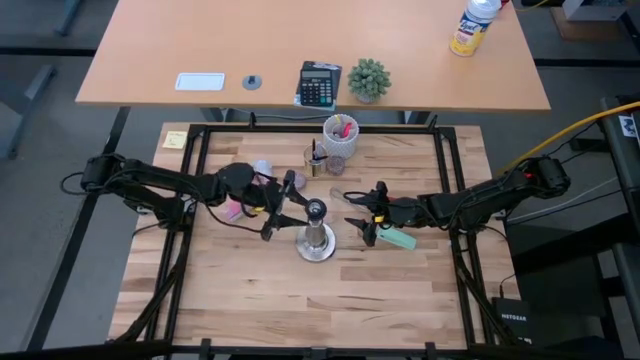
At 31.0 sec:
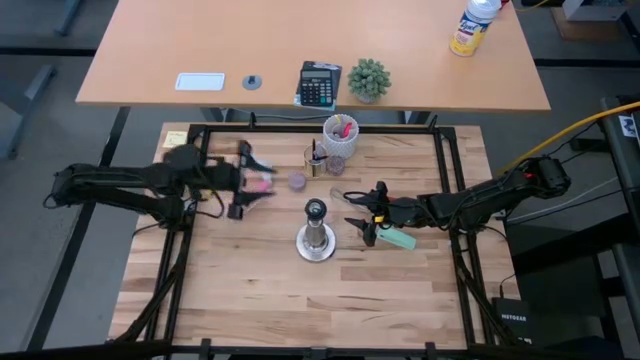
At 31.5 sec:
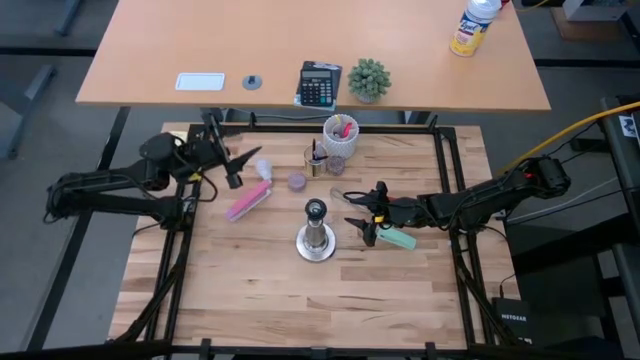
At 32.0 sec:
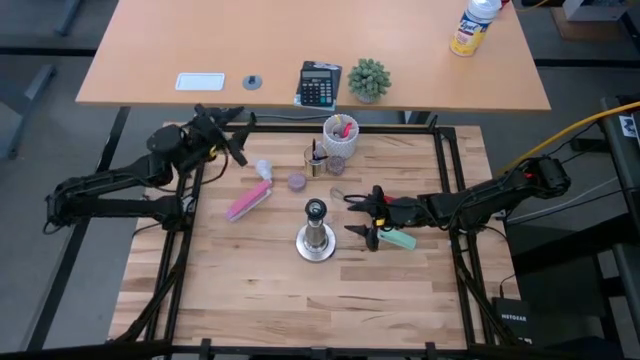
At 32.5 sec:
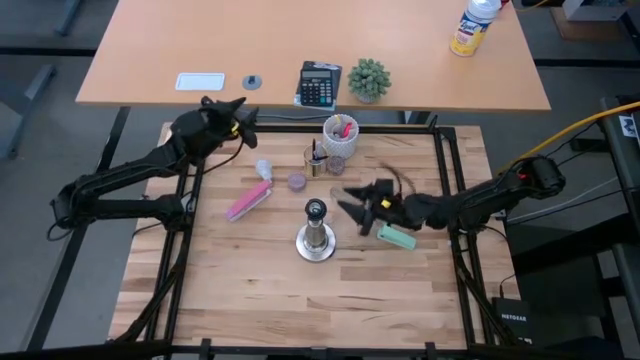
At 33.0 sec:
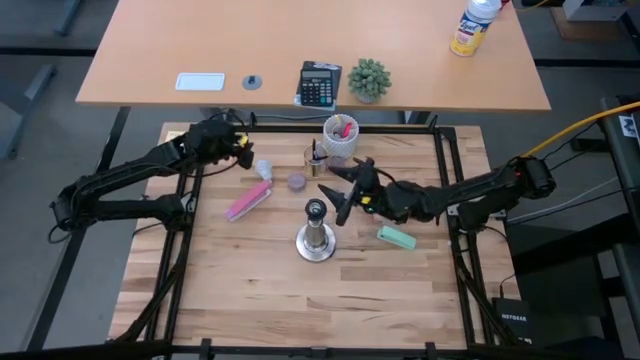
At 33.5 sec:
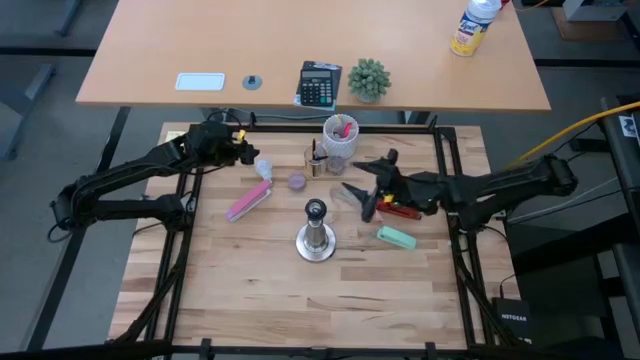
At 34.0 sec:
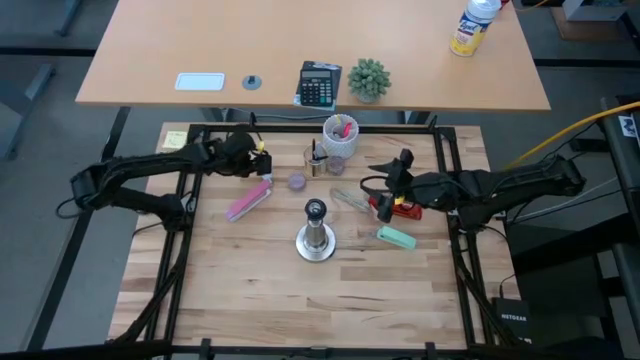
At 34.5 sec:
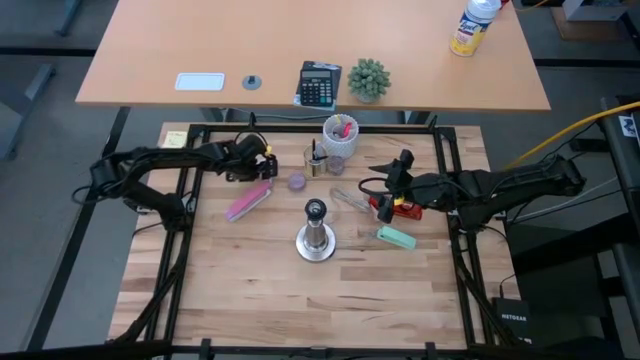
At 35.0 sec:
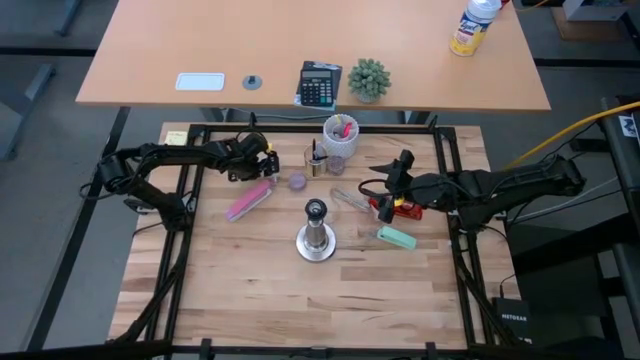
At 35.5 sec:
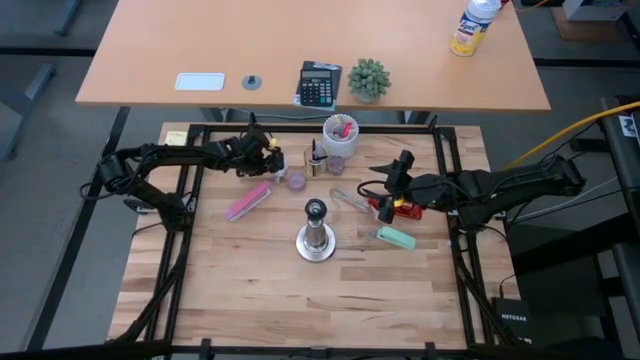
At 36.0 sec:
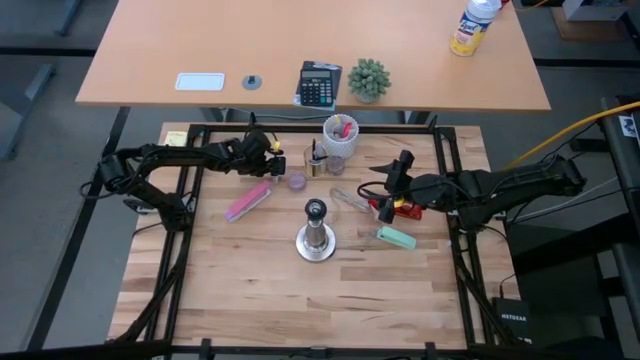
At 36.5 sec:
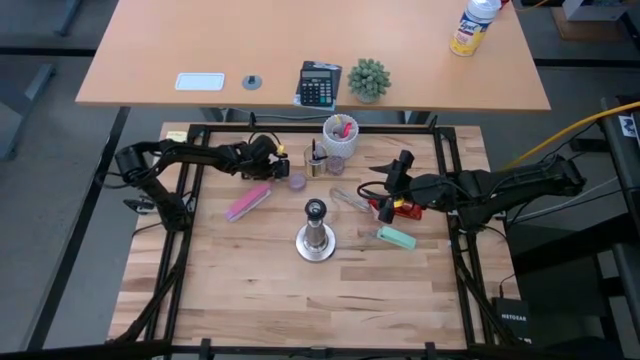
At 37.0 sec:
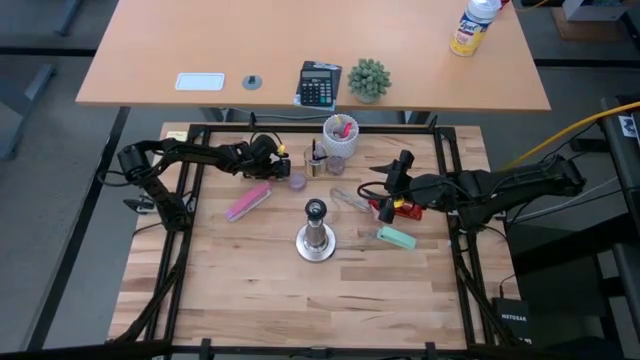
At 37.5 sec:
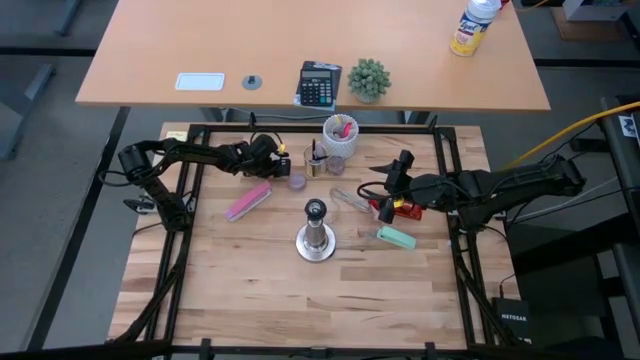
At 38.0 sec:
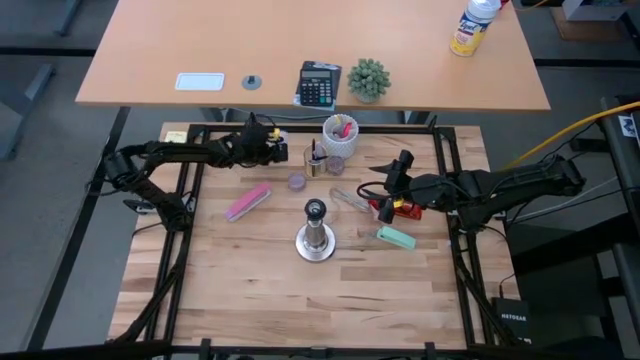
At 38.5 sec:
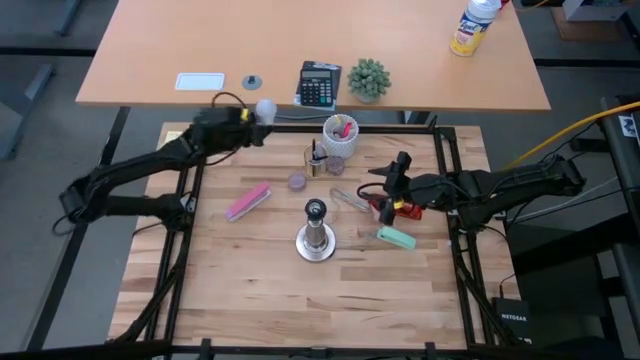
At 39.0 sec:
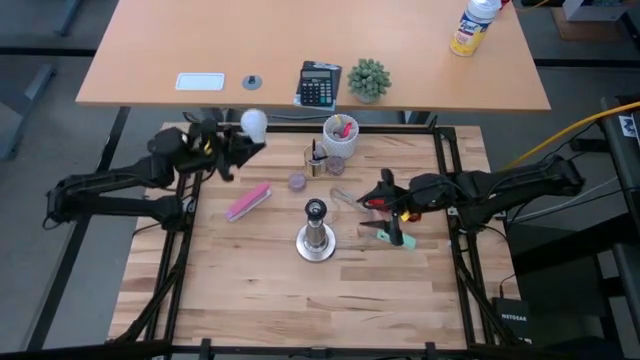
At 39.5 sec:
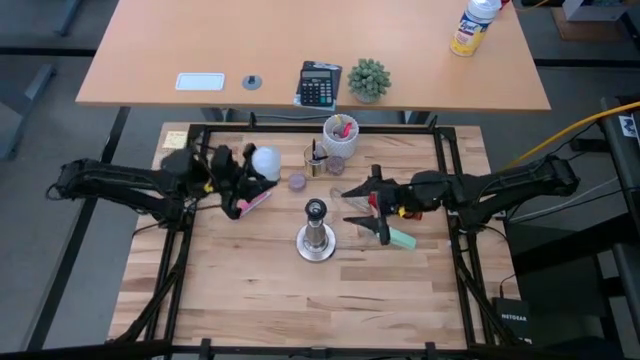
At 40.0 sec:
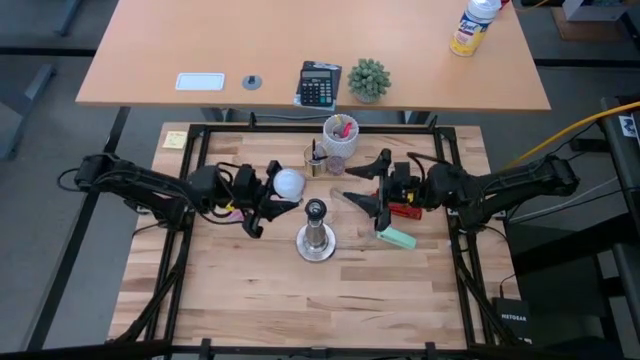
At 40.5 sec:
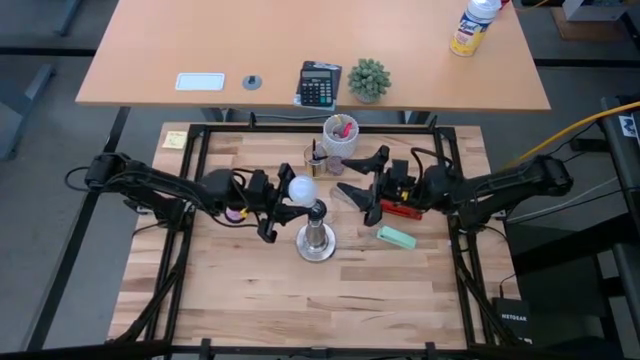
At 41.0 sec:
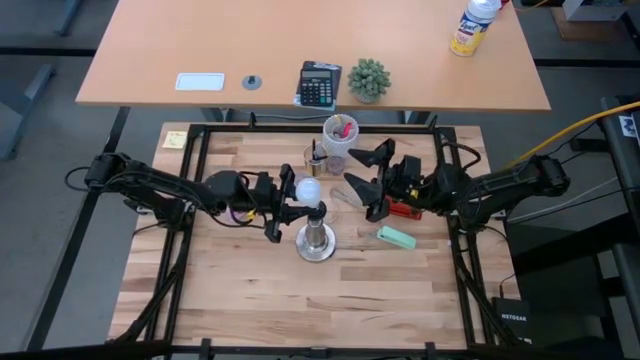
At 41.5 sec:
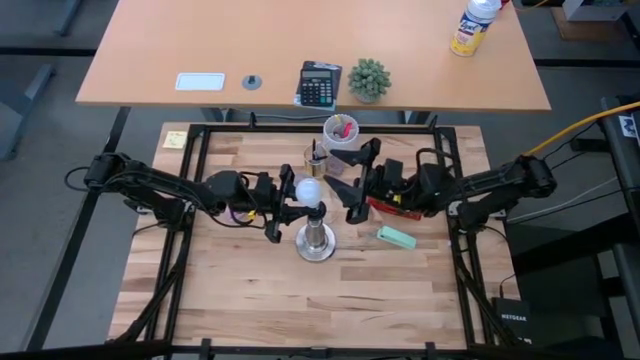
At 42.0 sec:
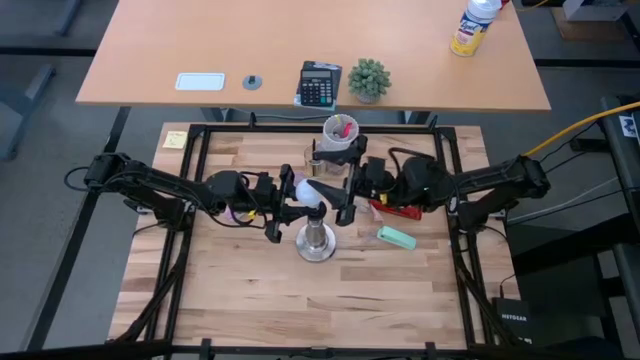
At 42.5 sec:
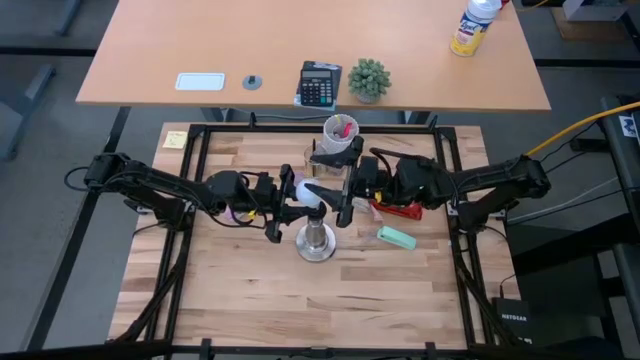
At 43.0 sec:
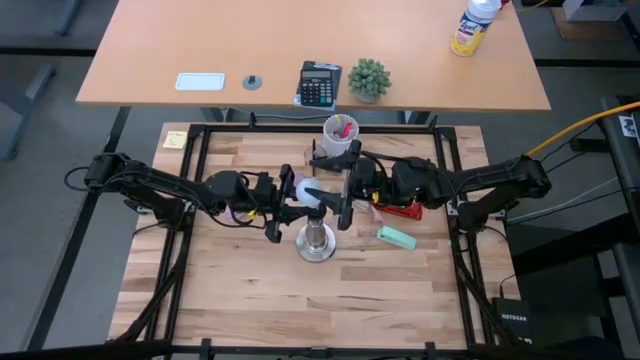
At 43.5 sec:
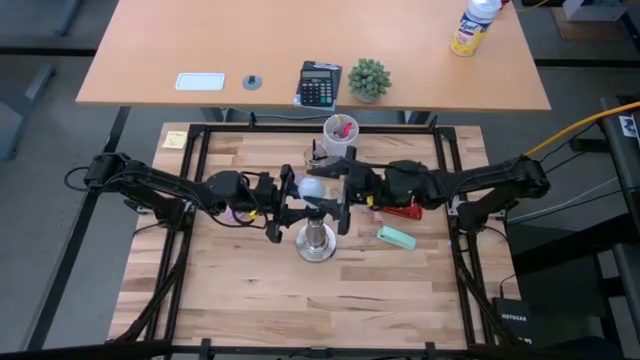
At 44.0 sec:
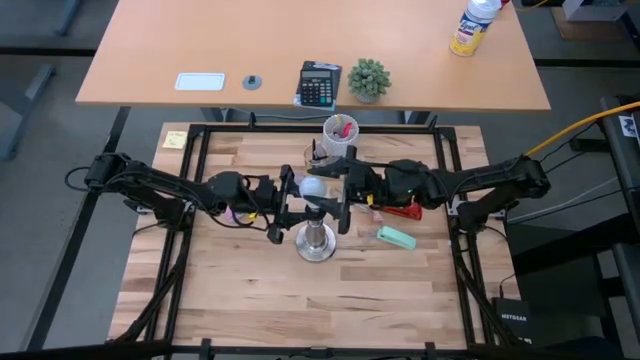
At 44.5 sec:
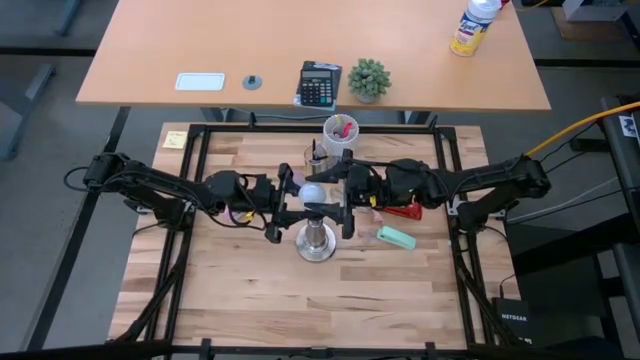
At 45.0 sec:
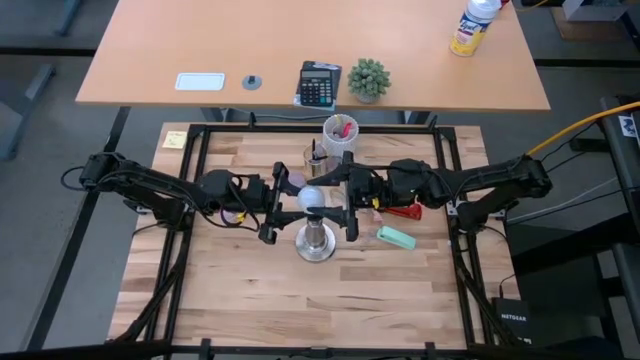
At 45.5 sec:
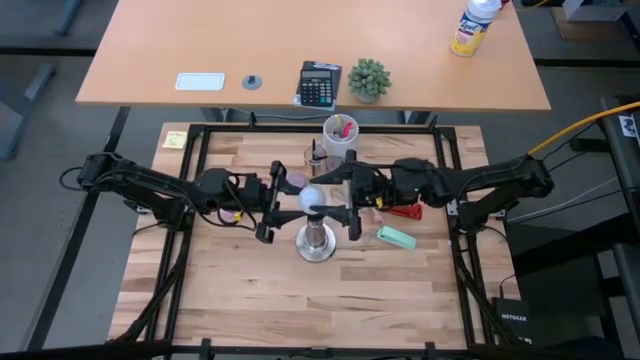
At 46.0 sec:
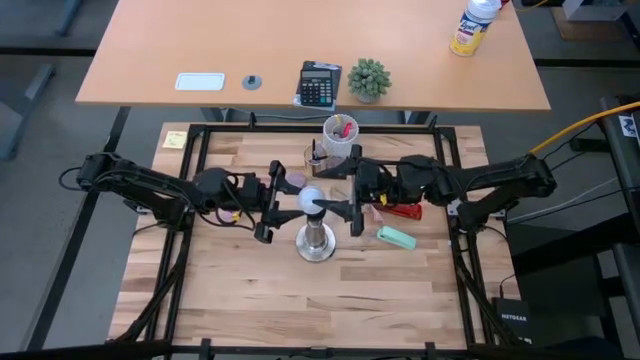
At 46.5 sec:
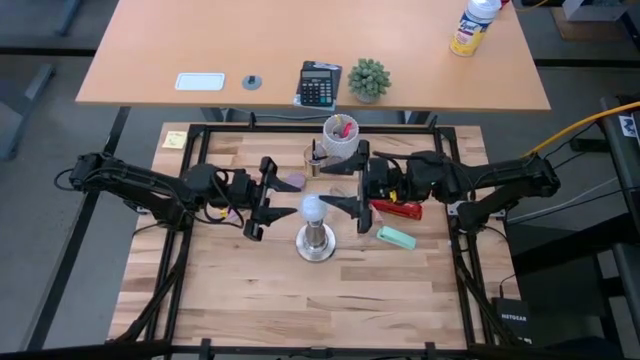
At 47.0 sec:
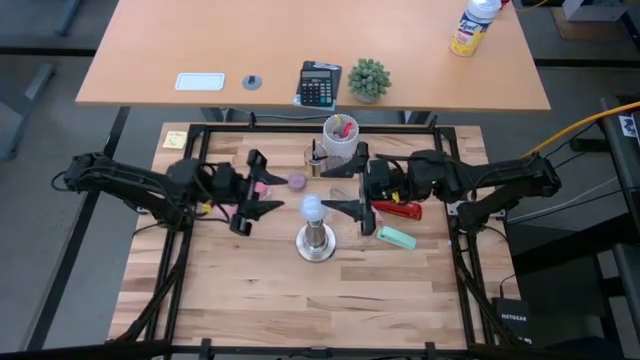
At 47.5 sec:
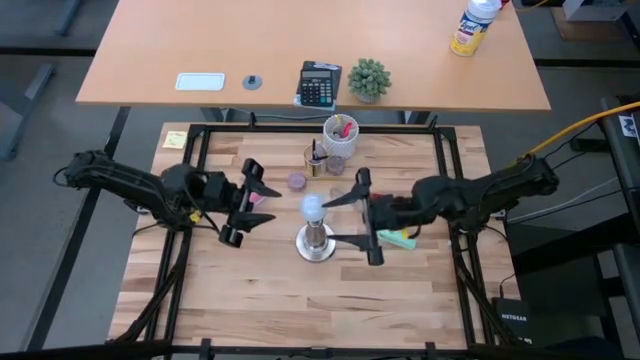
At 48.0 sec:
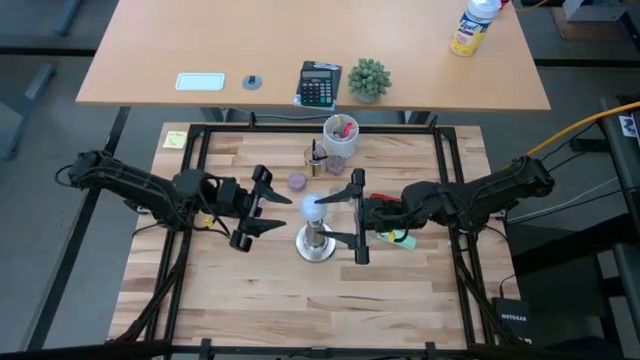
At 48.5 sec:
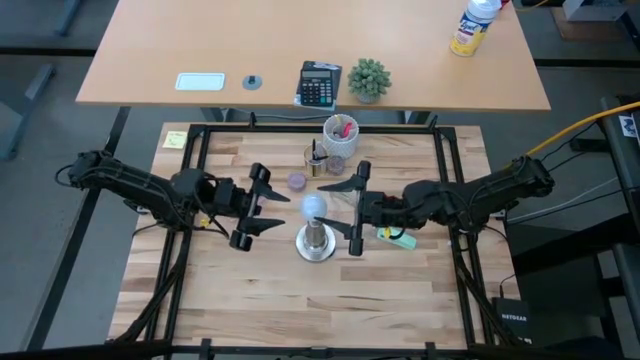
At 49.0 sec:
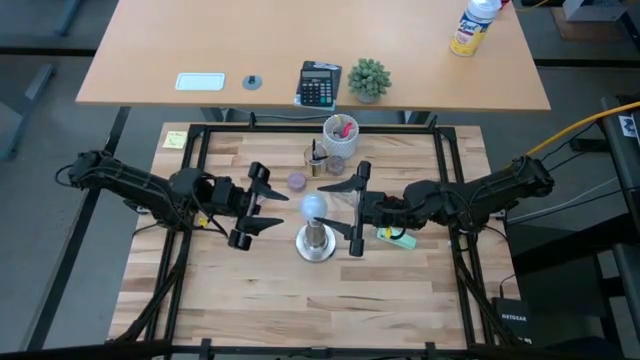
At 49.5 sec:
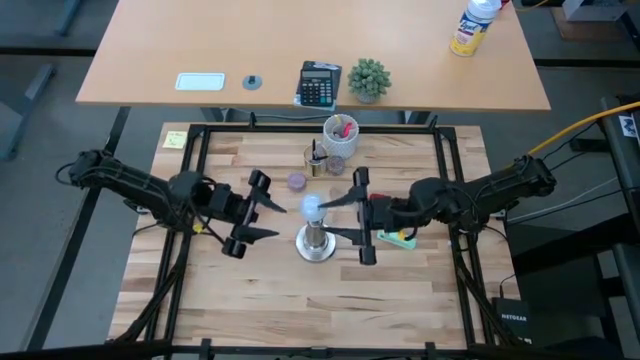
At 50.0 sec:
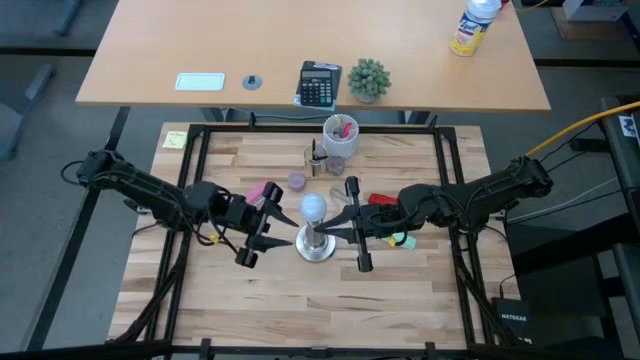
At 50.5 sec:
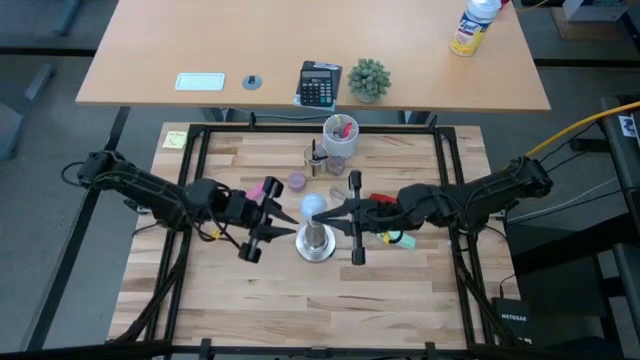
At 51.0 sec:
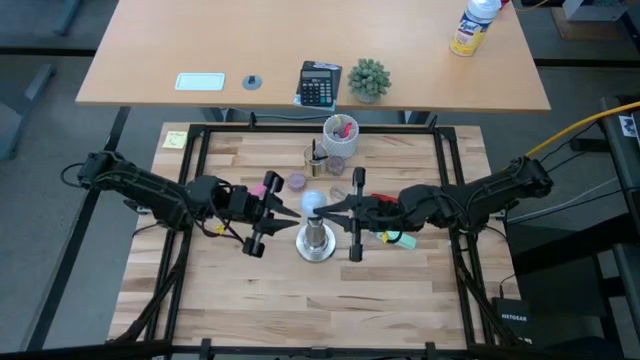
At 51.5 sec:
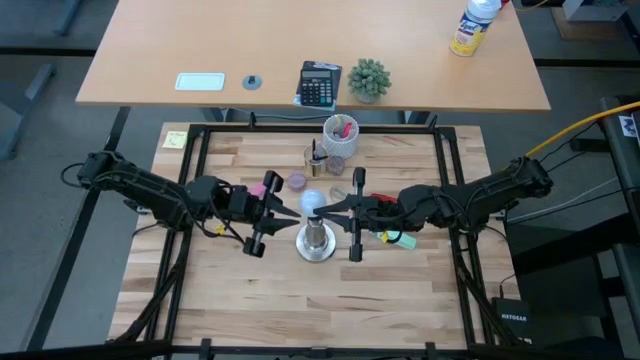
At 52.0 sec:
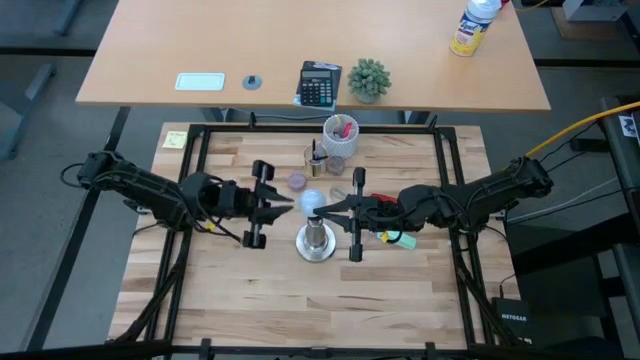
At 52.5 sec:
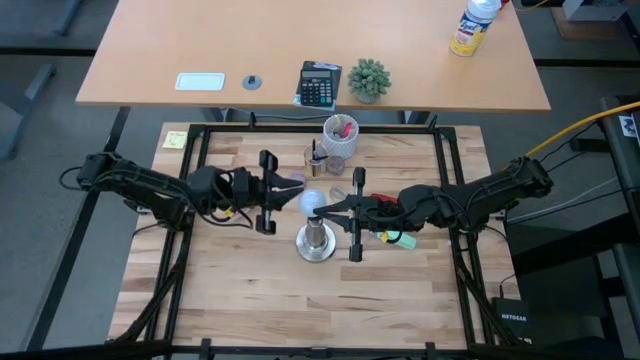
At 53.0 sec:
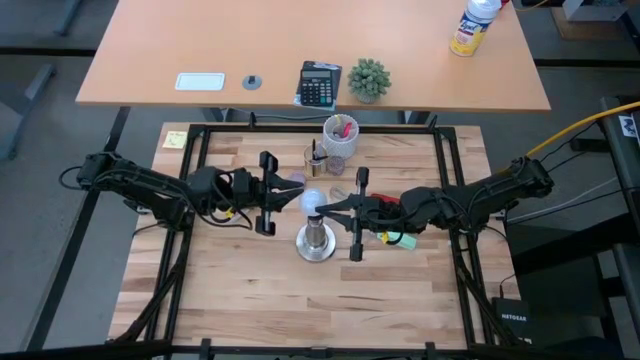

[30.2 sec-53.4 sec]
Task: Screw lightbulb
Insert the lightbulb into the lamp socket
